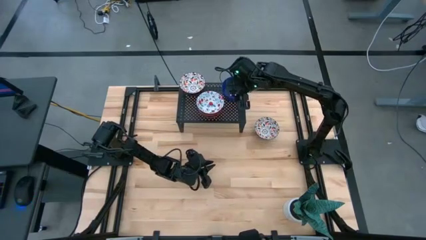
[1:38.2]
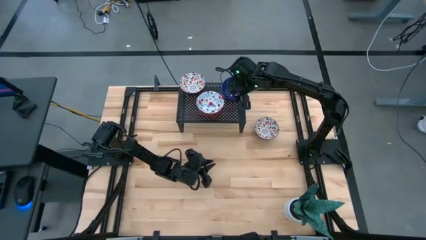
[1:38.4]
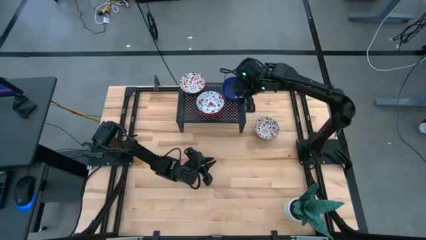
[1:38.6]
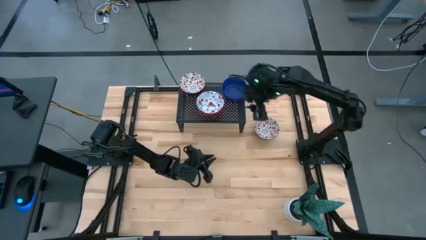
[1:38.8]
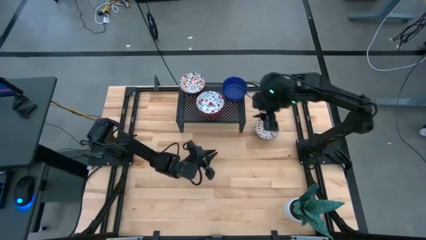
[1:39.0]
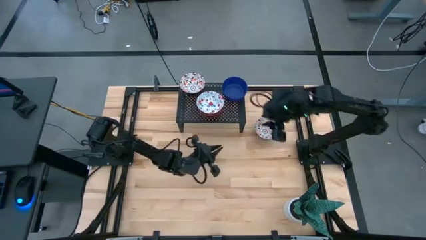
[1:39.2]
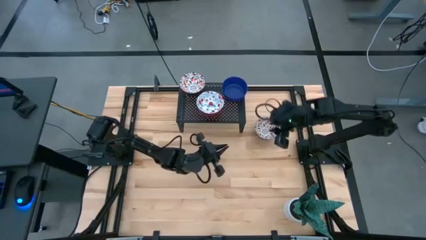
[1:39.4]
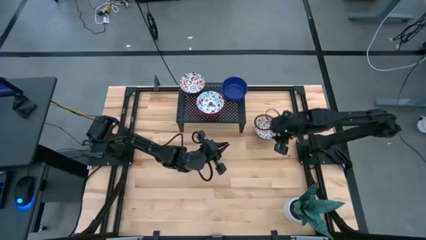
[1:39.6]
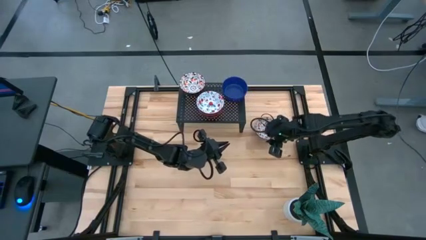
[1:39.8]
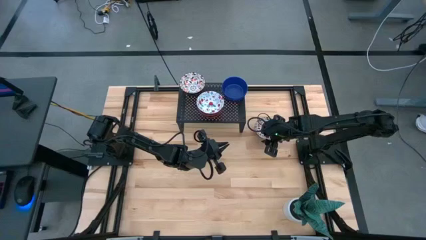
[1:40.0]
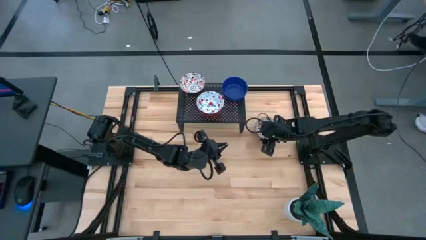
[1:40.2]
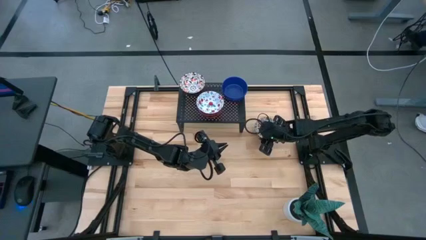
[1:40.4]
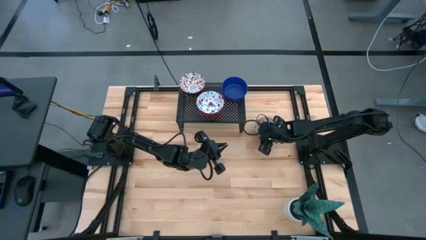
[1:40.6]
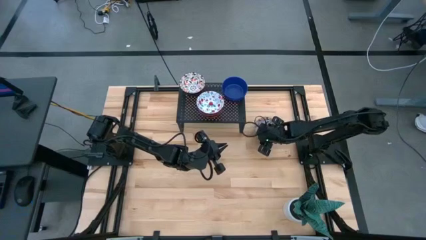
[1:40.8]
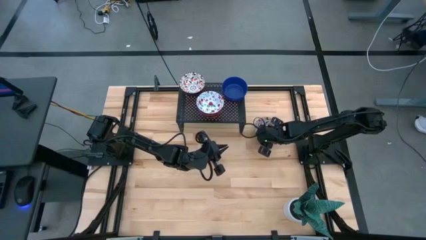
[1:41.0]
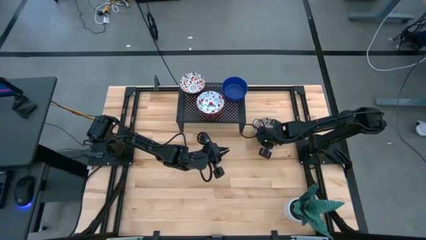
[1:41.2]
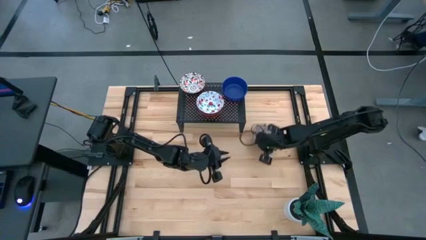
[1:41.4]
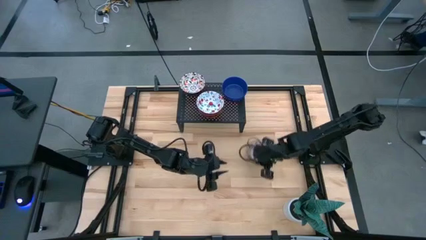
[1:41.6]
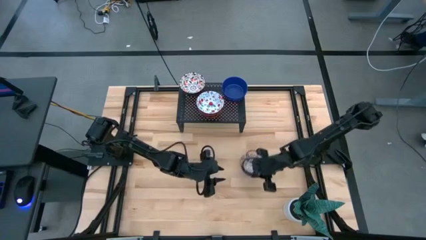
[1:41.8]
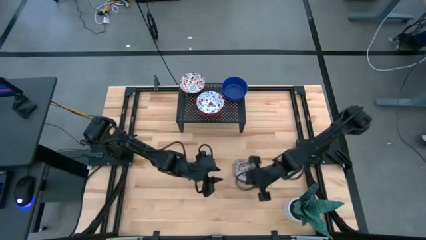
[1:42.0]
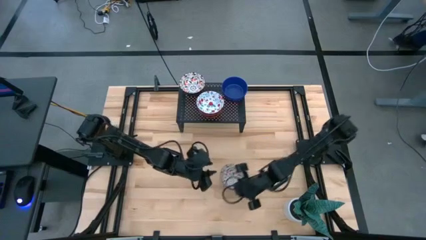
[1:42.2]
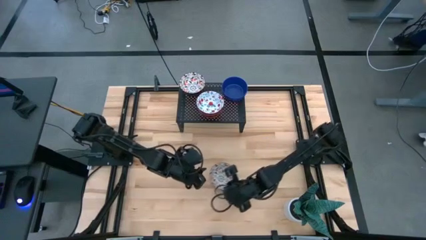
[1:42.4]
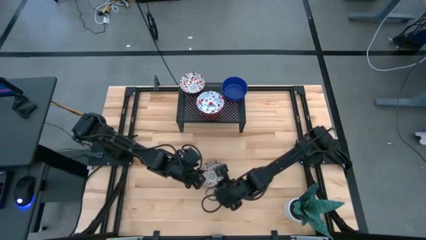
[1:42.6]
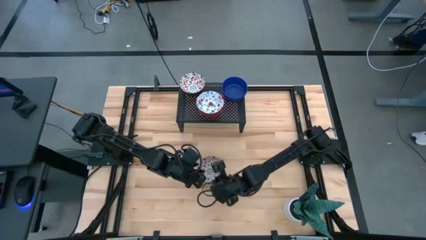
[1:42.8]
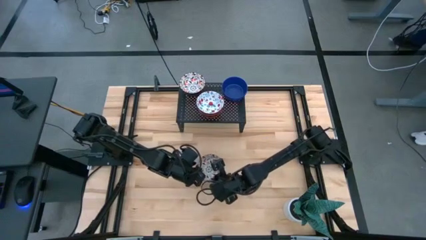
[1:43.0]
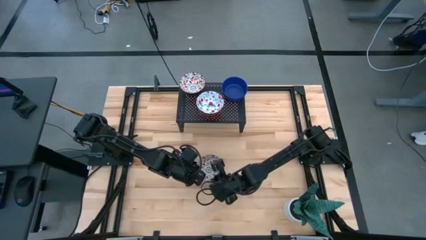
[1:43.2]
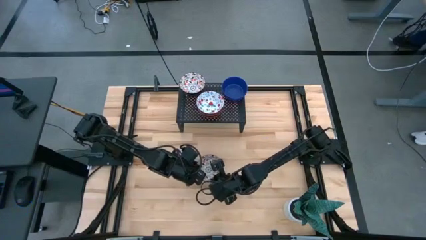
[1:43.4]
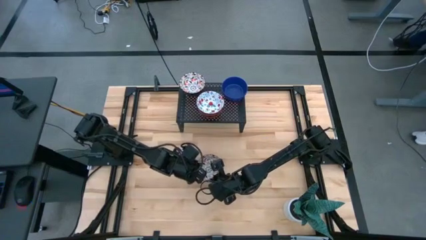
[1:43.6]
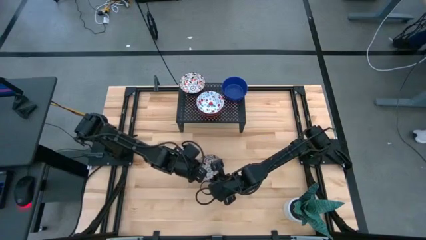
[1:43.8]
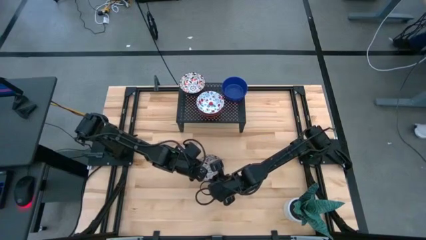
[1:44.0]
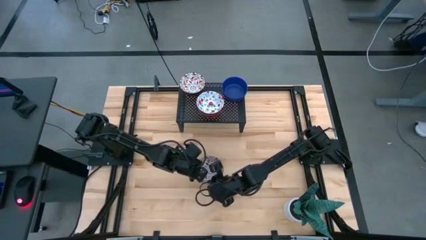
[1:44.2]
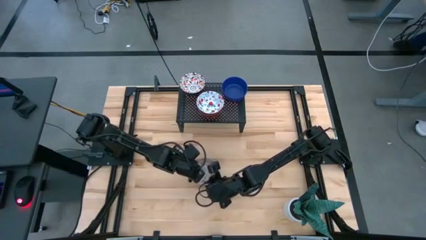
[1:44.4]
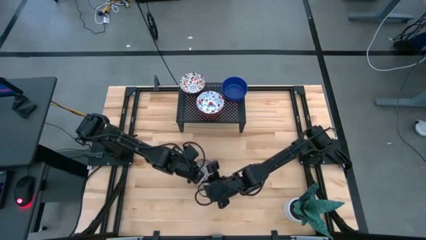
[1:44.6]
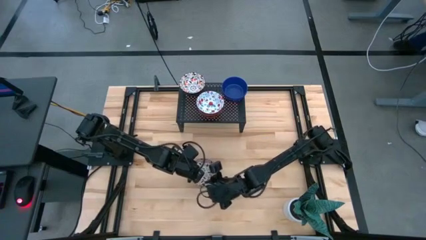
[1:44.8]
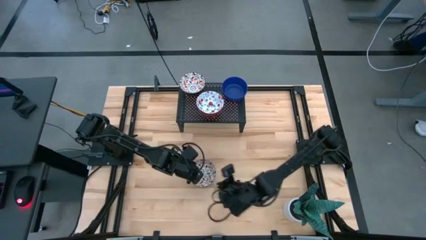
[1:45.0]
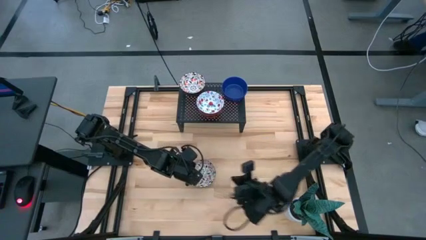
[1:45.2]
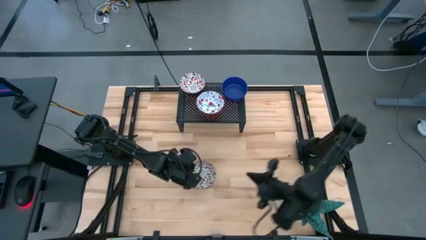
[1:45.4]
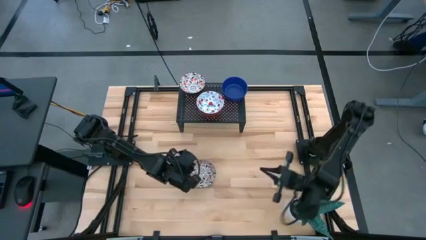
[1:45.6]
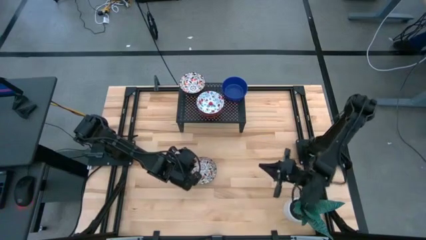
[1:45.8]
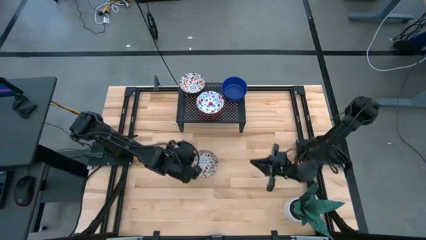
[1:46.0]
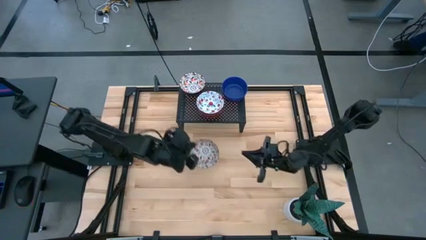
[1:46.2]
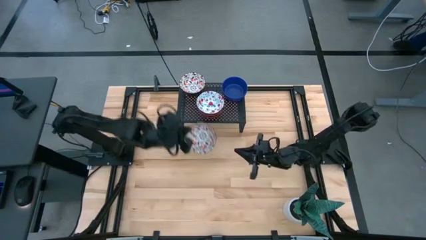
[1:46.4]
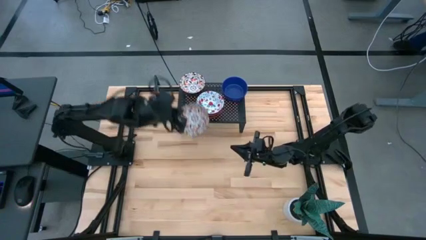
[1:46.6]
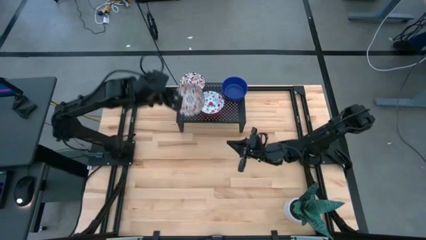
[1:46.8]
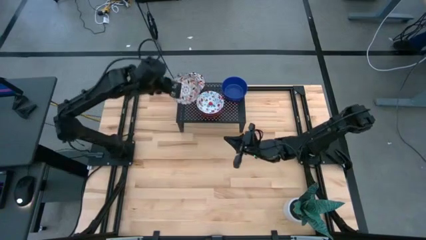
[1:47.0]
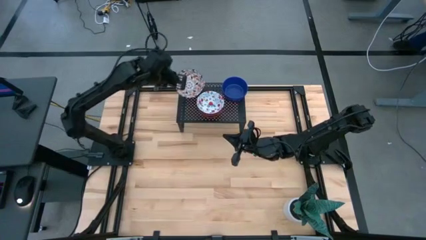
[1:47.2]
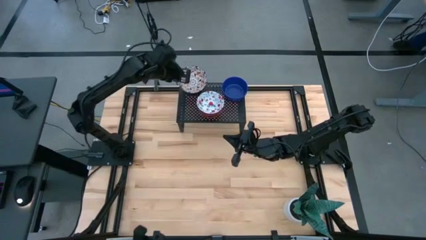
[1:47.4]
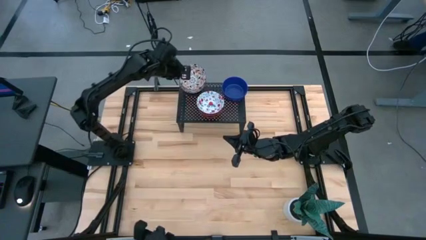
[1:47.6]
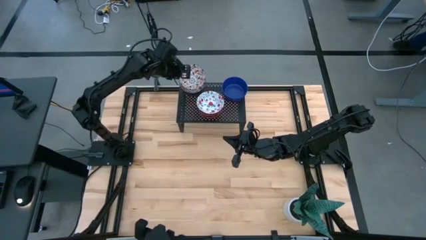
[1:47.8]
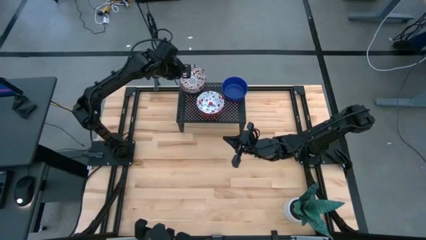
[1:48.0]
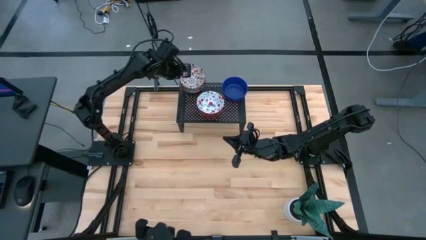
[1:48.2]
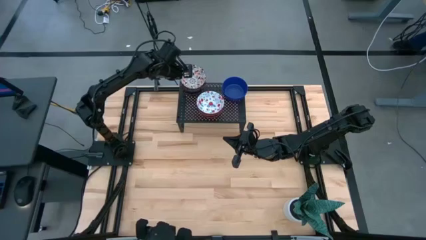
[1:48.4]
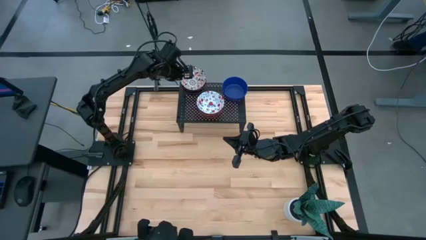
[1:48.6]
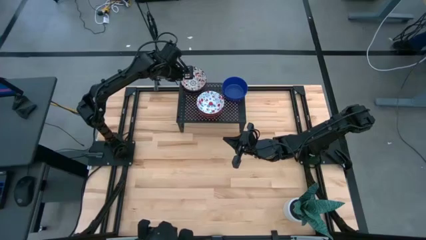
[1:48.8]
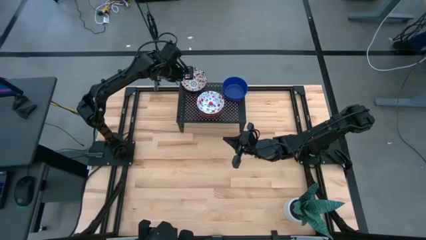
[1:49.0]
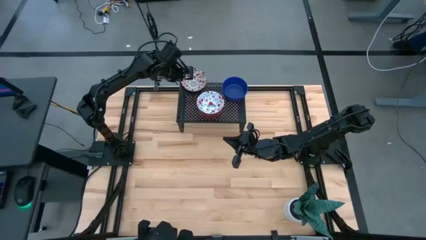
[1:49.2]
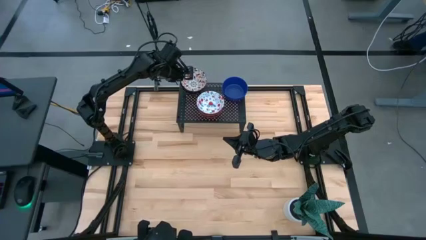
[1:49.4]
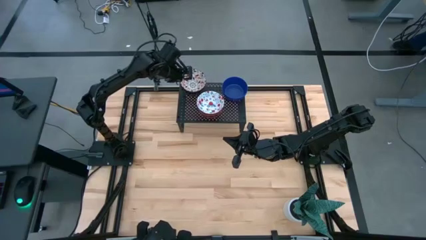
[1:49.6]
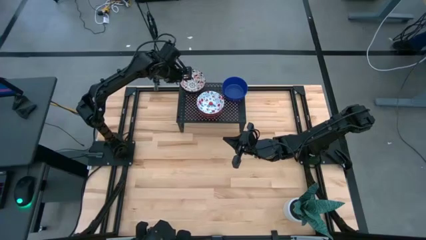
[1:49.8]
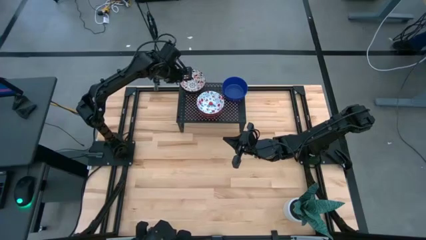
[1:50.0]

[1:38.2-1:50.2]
Task: Pick & Place Mini bowls
Stack the black bowl on the black bowl on the shelf

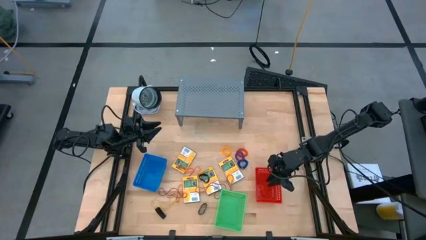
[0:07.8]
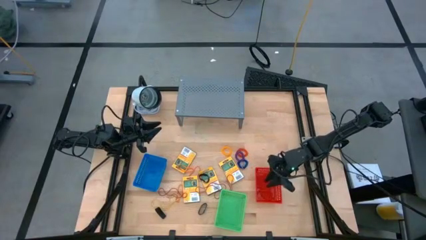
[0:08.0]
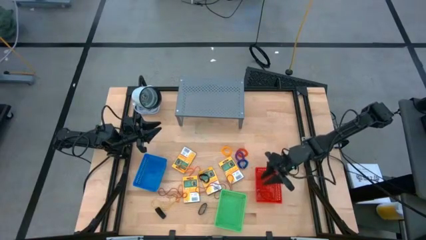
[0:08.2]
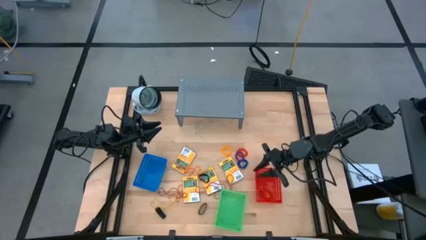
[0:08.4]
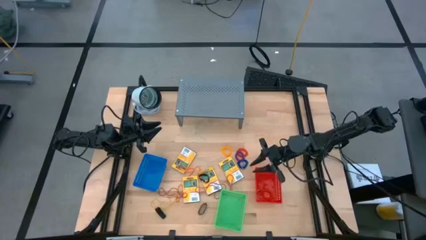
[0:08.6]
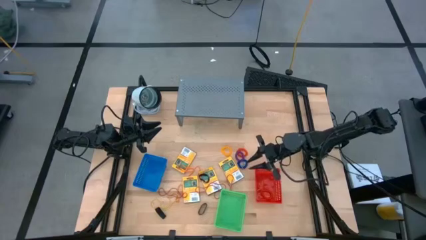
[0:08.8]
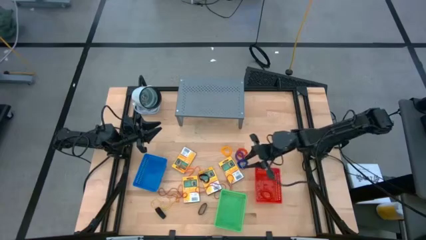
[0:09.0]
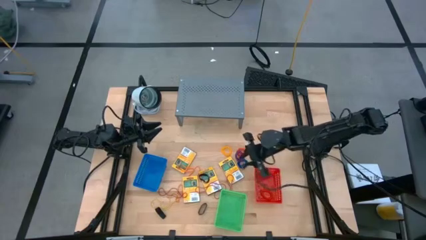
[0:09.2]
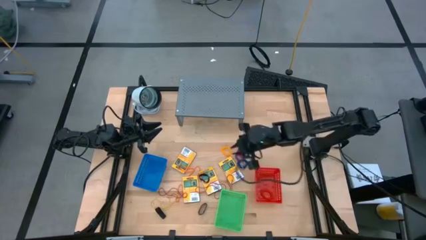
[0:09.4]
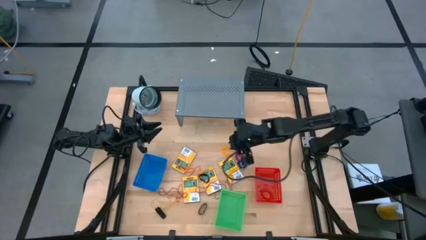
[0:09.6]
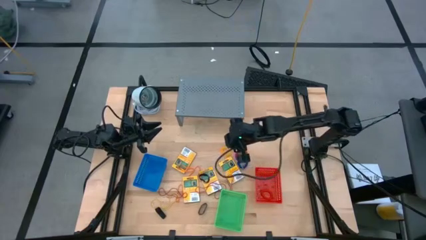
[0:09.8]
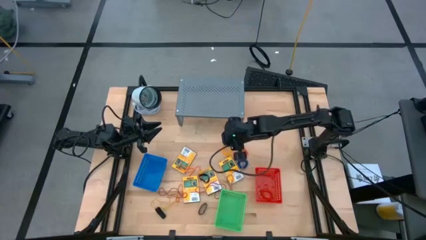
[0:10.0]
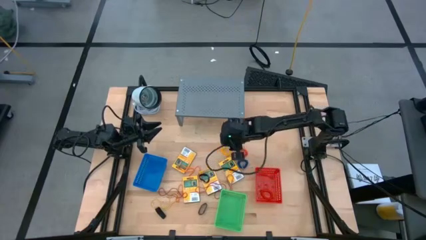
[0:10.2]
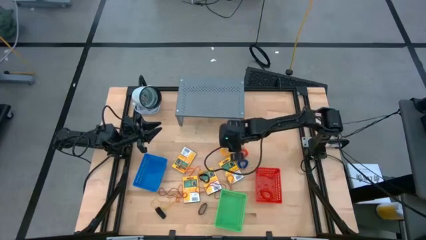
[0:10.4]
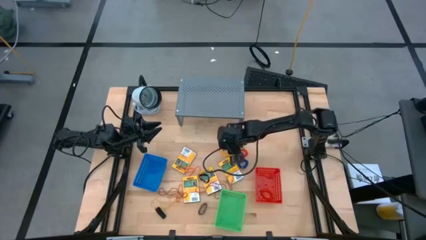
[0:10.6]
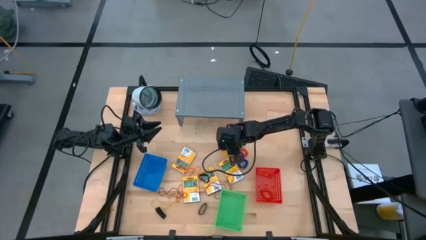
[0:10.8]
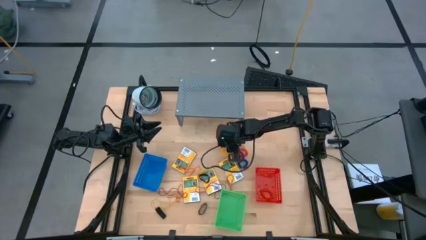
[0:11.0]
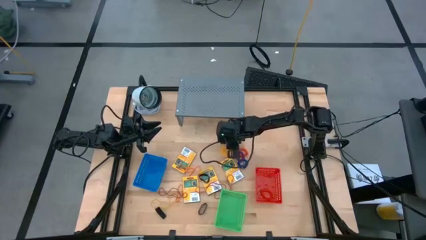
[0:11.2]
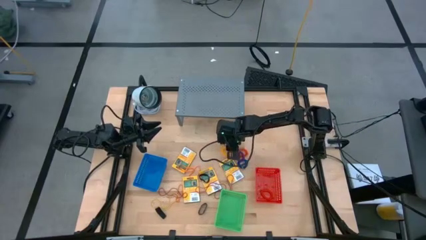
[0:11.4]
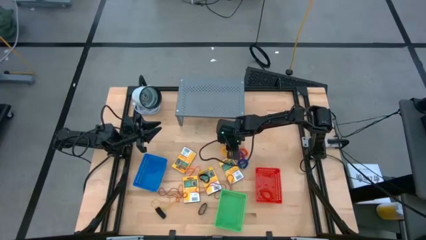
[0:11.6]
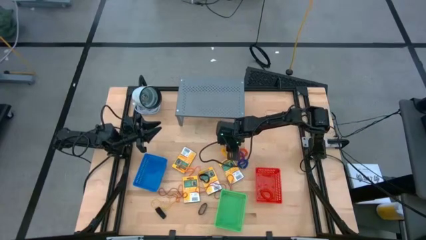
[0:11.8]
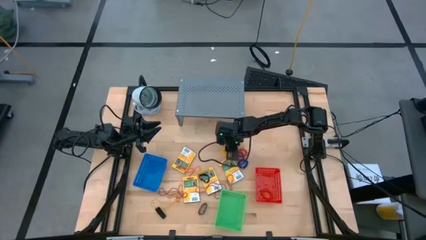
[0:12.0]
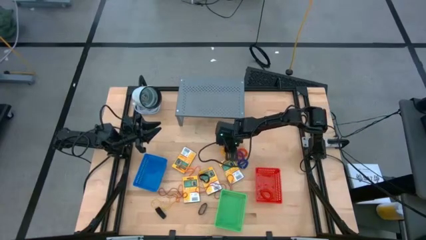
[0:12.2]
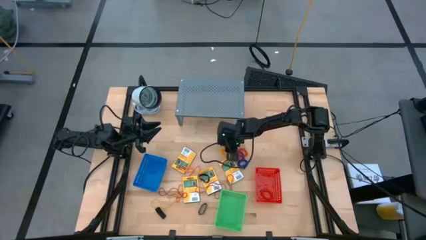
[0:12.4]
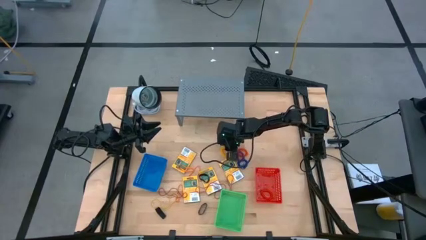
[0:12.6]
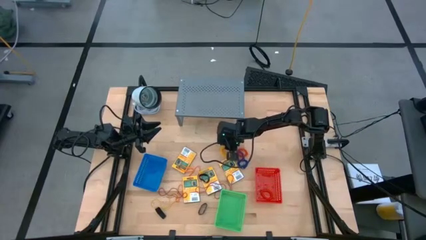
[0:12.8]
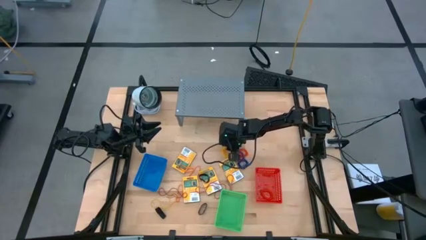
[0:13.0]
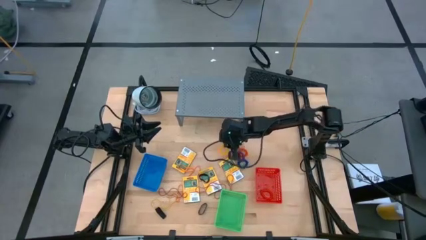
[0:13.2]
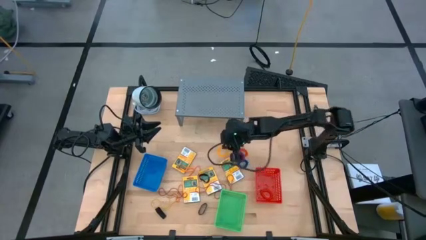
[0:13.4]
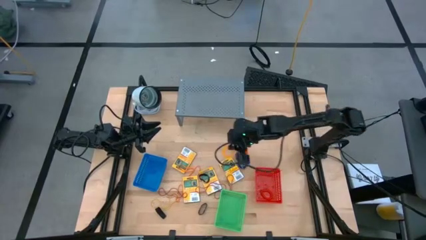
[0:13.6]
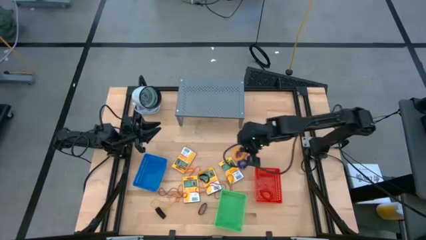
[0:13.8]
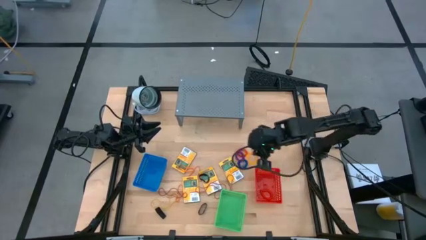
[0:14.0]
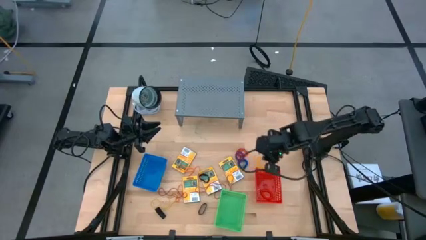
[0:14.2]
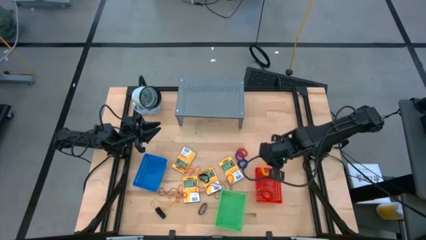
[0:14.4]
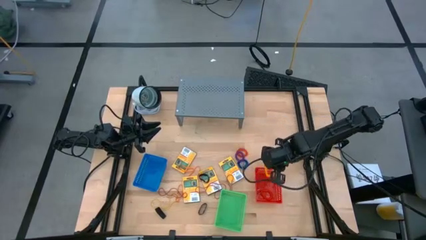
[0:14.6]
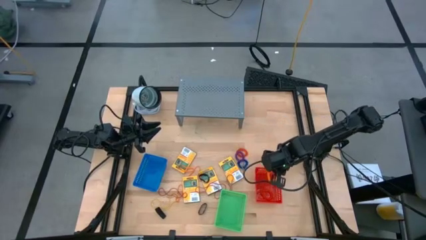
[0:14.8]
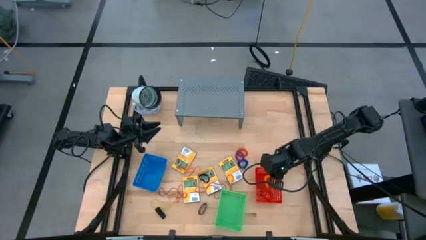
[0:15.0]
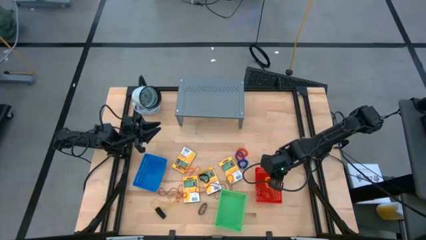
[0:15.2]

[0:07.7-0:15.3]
Task: Pick & Place Office Desk Supplies
Put the yellow spring keychain into the red bin
